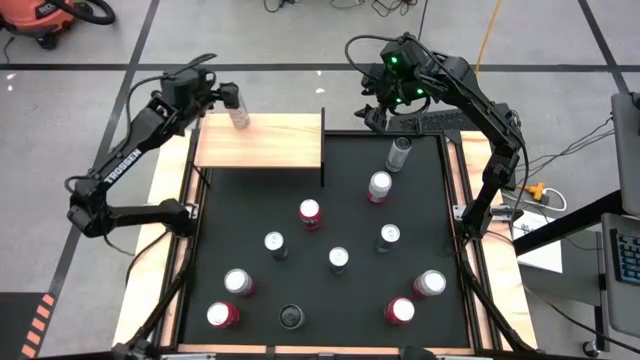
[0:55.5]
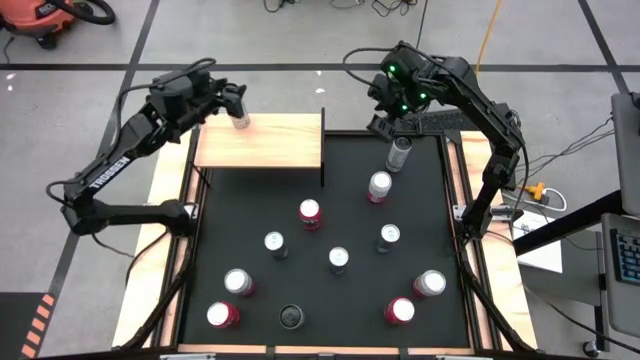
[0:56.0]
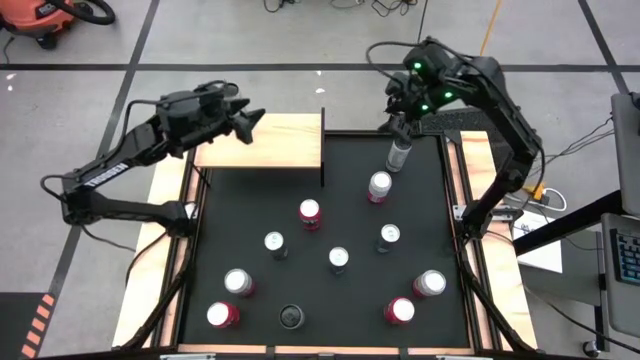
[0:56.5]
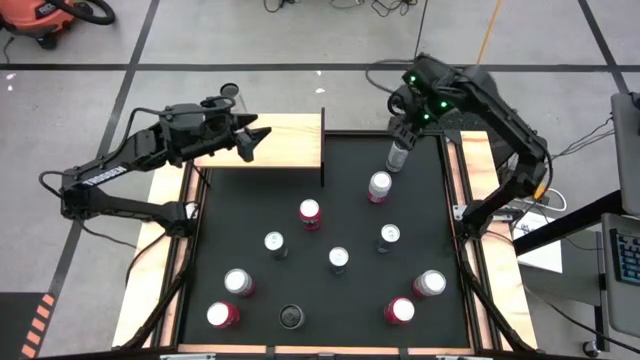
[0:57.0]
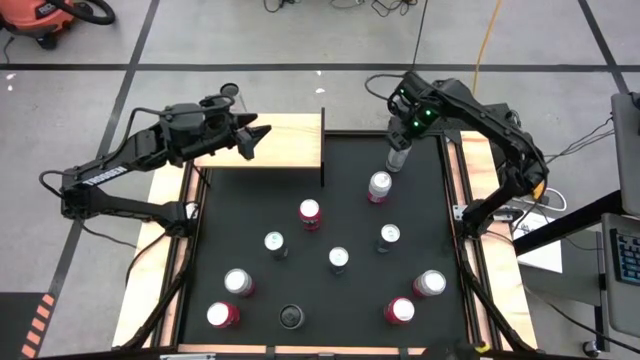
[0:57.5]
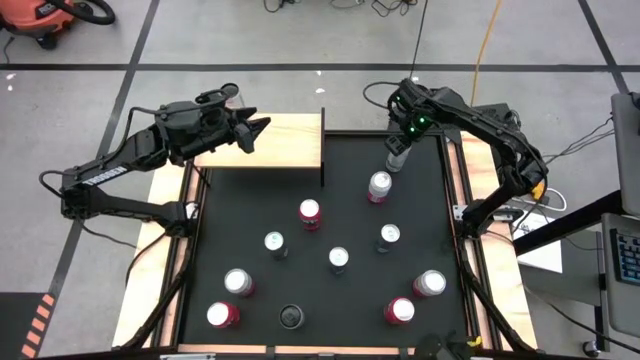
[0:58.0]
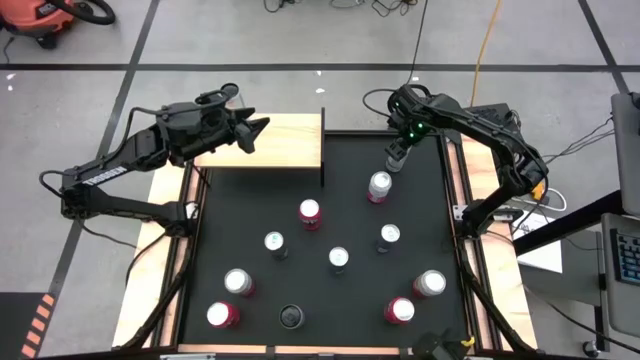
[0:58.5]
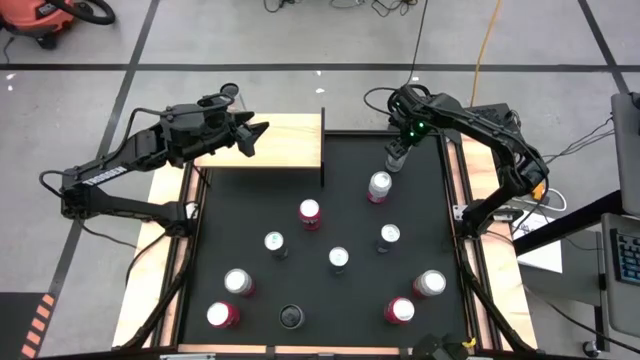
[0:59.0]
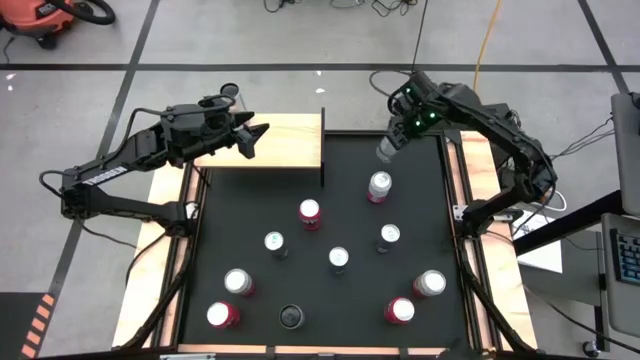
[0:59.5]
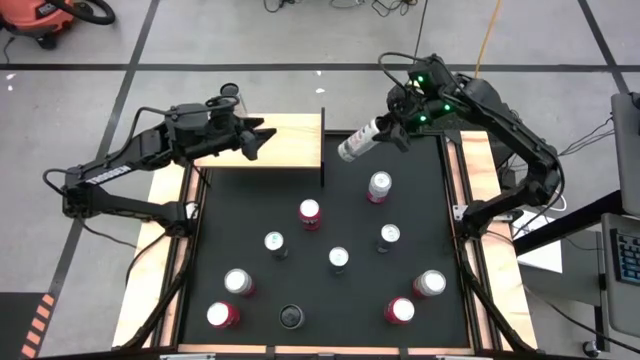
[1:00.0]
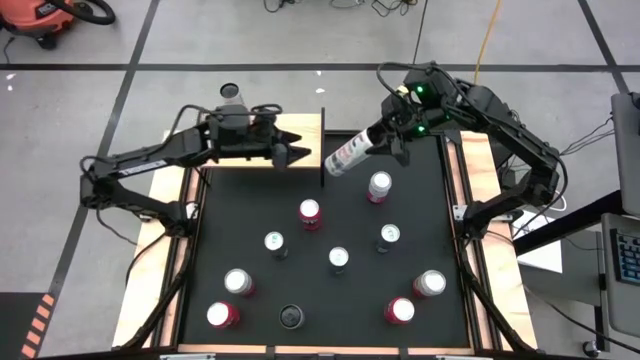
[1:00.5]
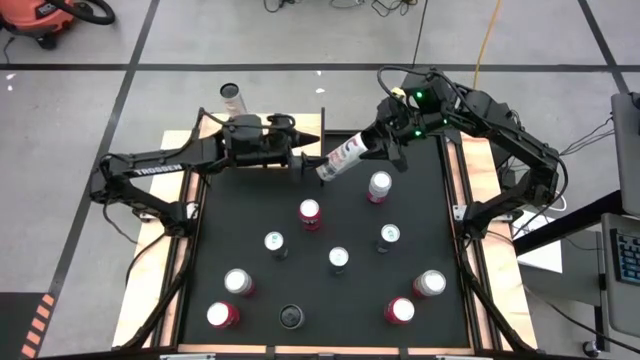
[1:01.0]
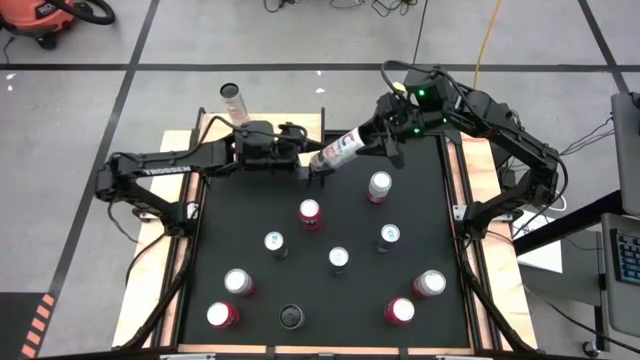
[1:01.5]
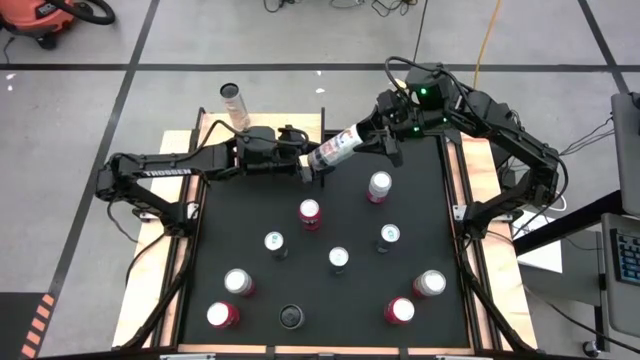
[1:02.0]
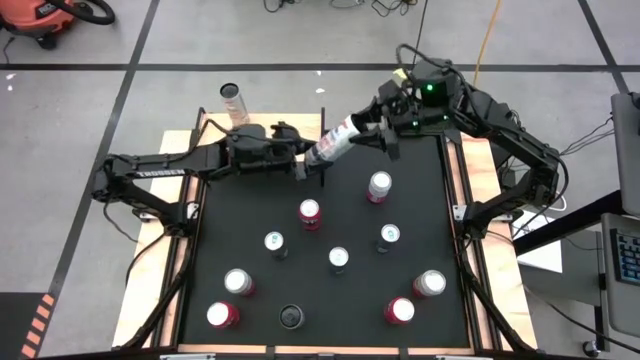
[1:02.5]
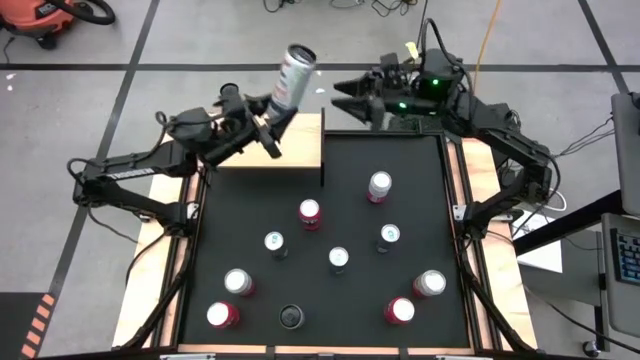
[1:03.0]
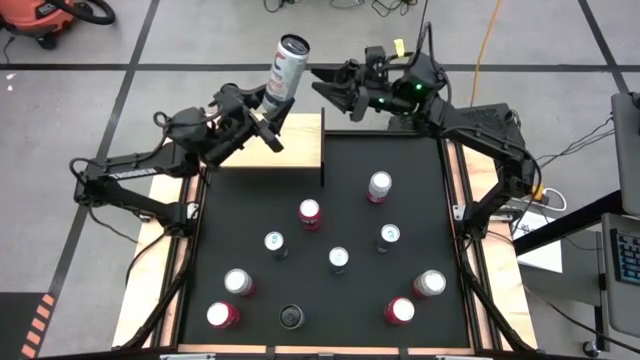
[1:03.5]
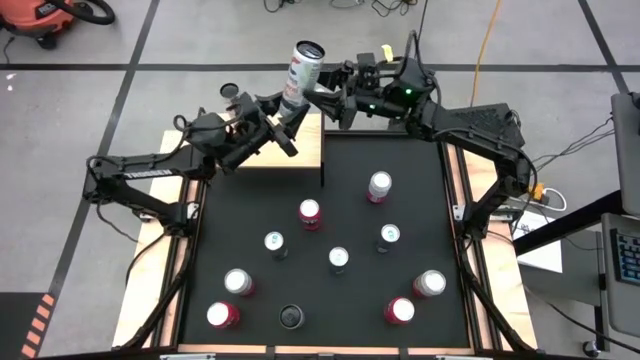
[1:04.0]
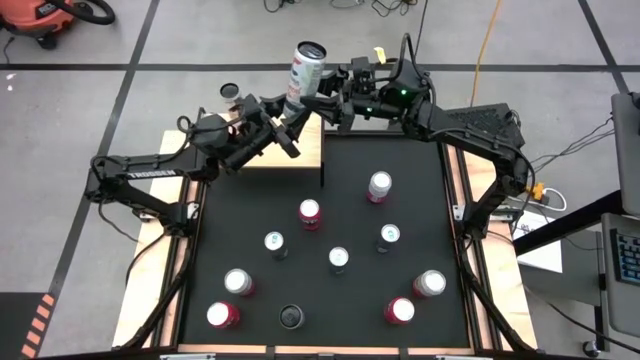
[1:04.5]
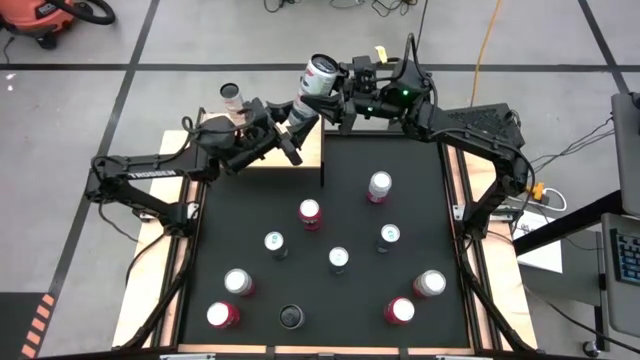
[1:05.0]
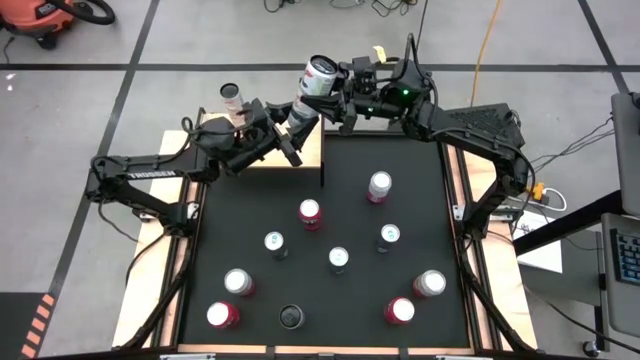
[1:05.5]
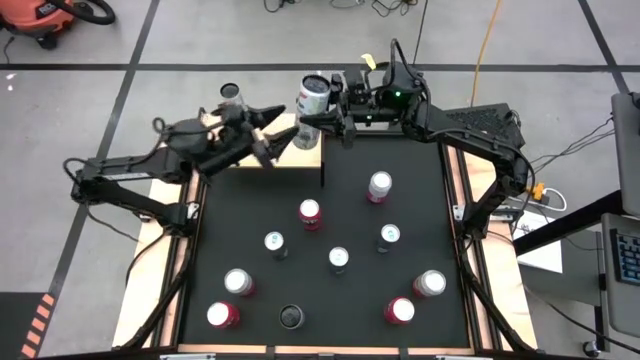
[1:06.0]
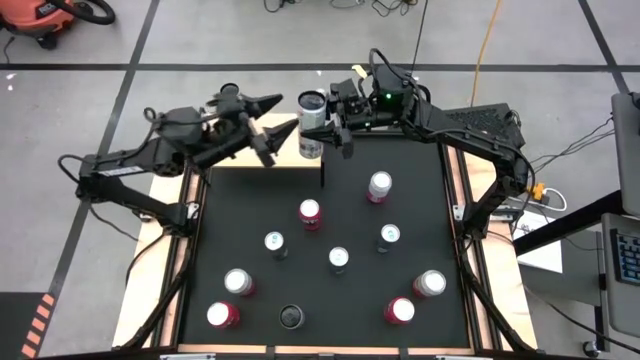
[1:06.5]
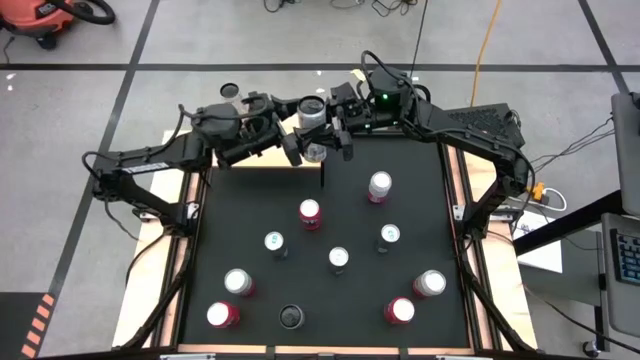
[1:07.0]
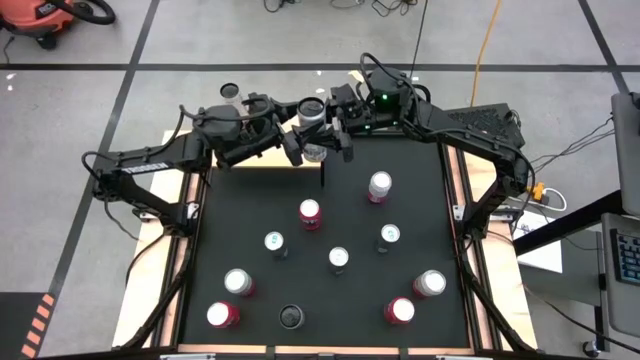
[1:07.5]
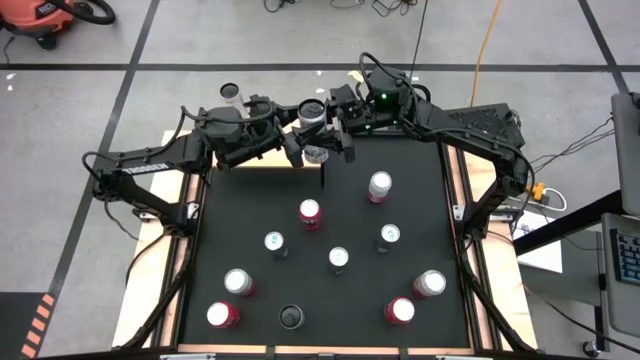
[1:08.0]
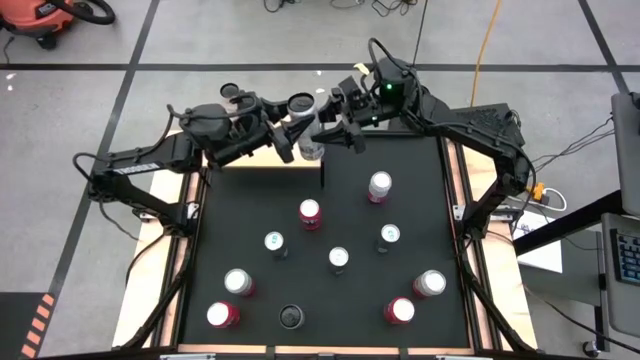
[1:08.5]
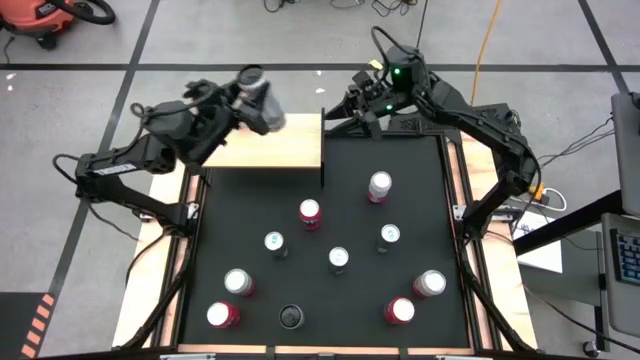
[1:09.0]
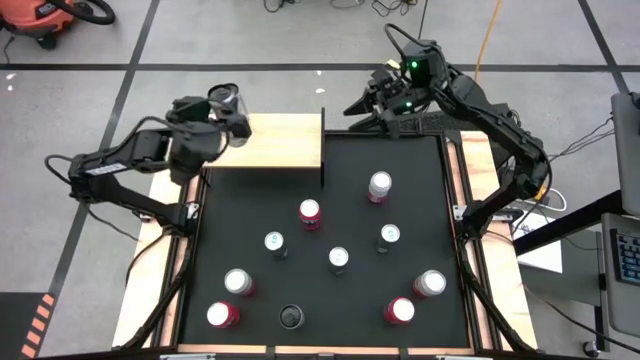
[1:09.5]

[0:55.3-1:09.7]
Task: Place canned beverage on shelf
Put the top white yellow soda can on the shelf aligned with the other white yellow soda can

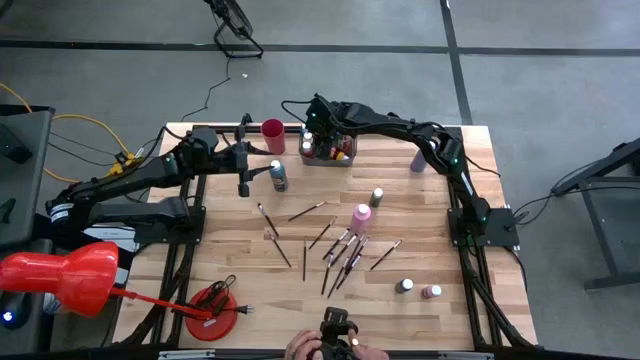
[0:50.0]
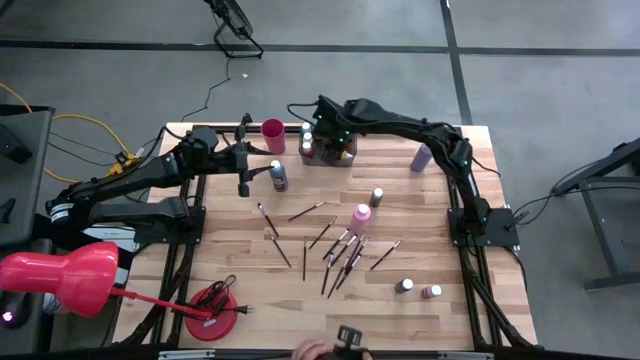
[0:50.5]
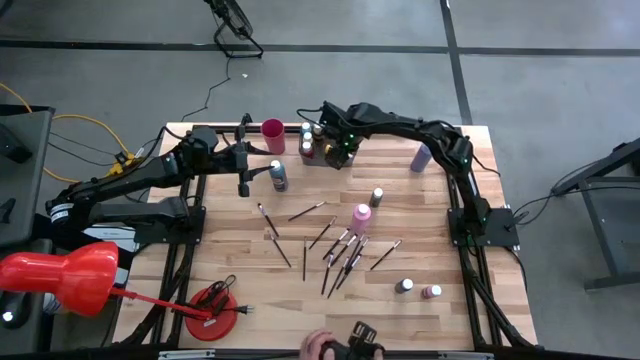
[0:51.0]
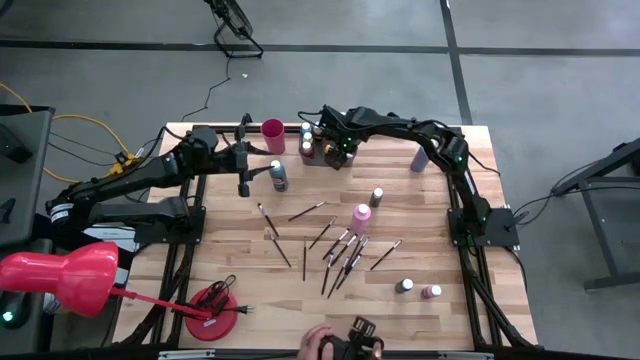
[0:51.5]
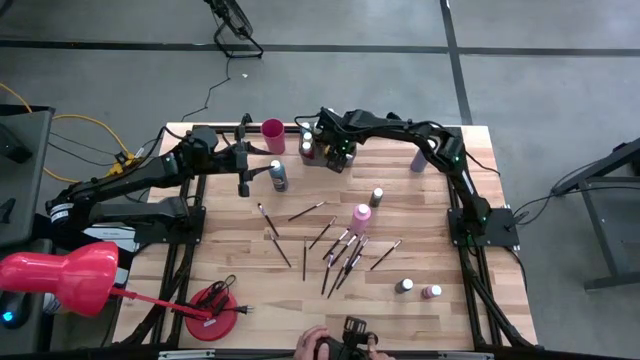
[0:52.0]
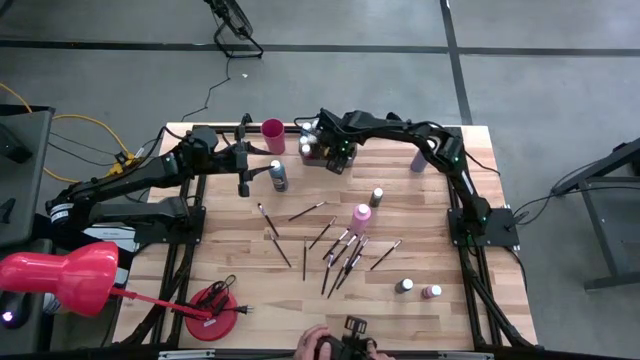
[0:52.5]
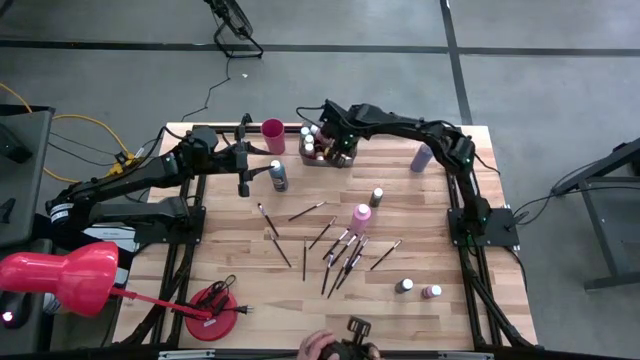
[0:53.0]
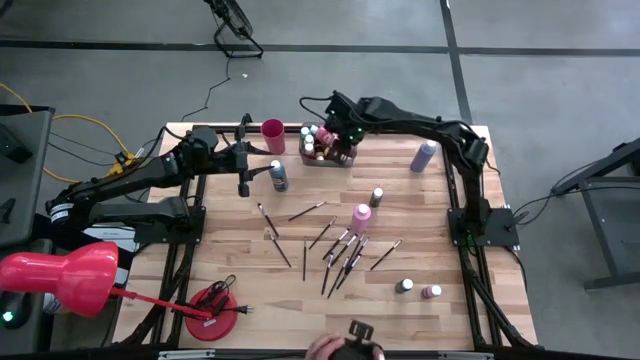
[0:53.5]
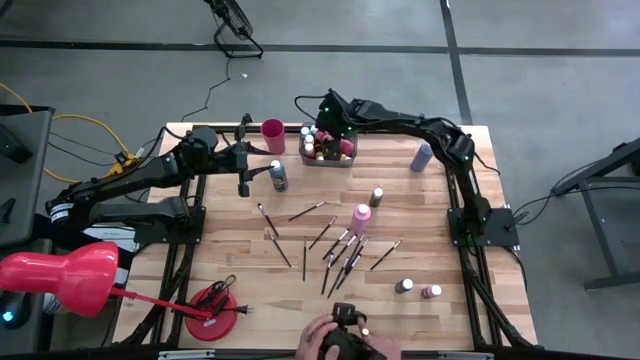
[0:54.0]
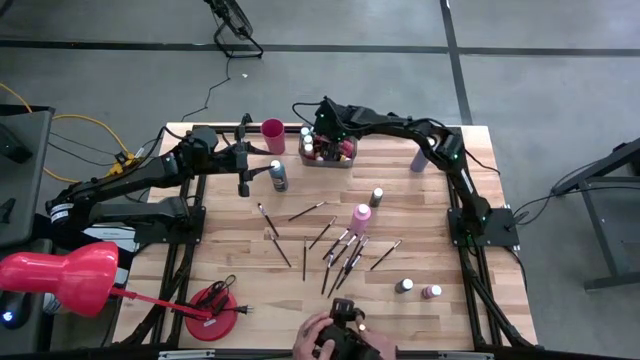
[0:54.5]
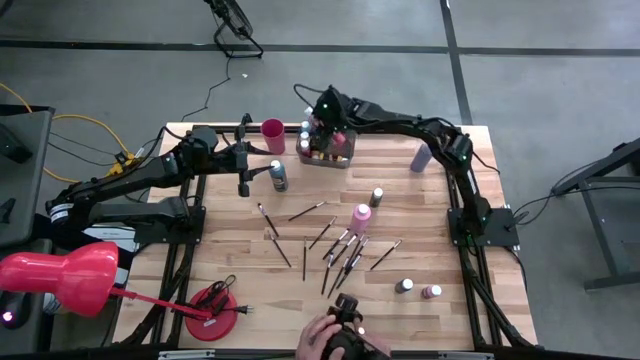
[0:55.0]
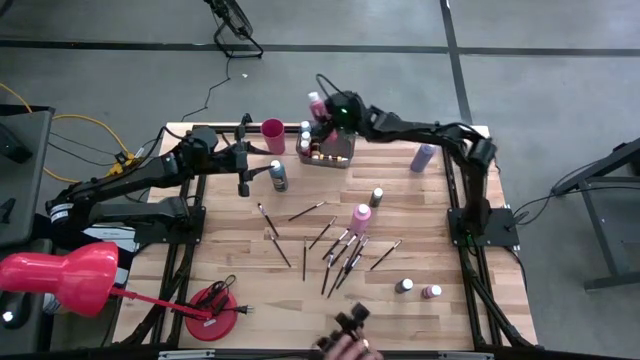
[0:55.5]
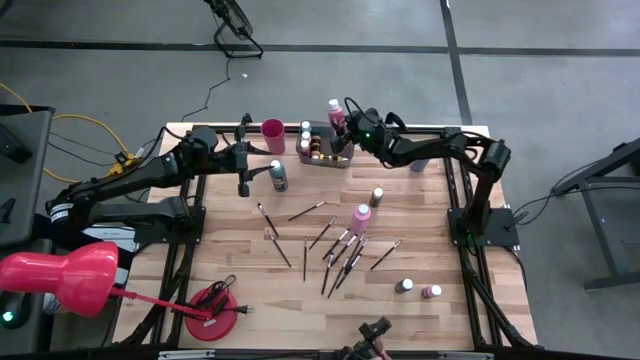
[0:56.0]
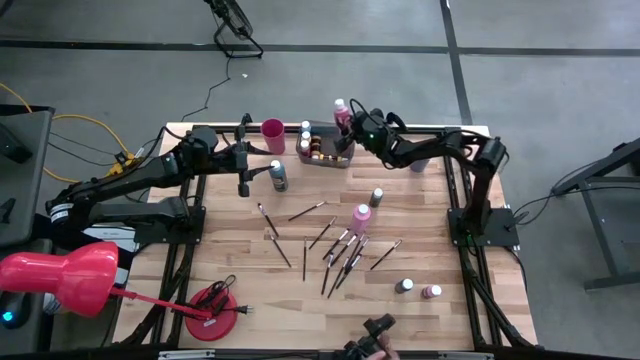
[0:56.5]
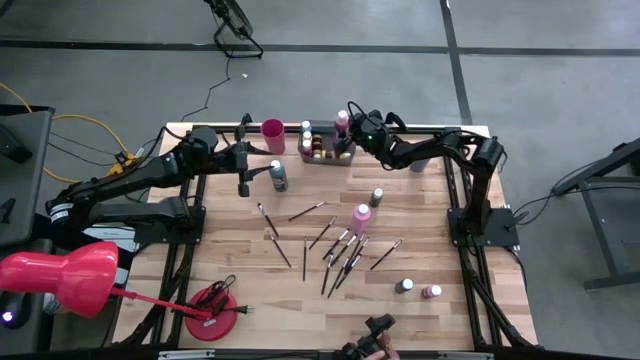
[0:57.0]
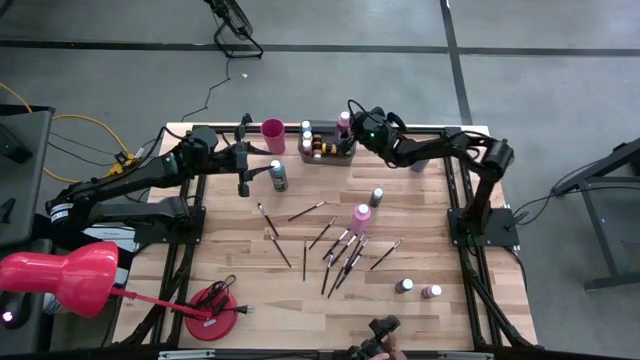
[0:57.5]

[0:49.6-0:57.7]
Task: Pick & Place Paint Supplies
Adjust the big red paint bottle on the black bin
